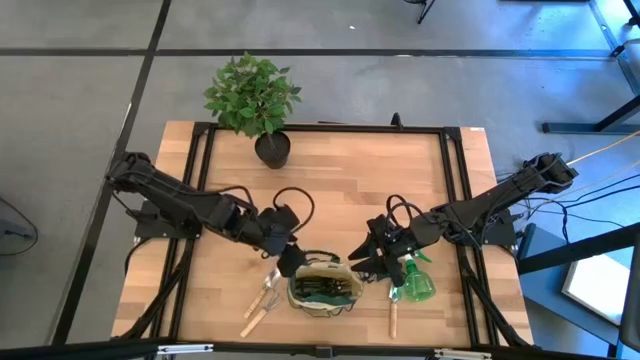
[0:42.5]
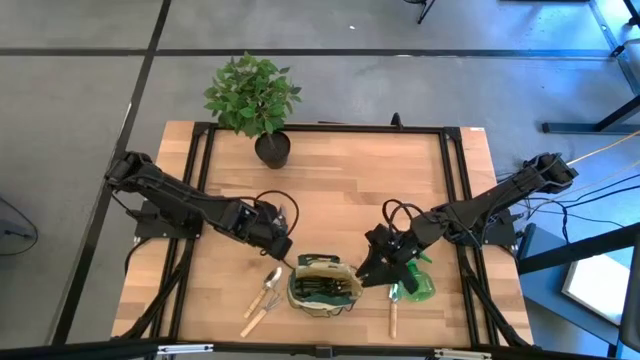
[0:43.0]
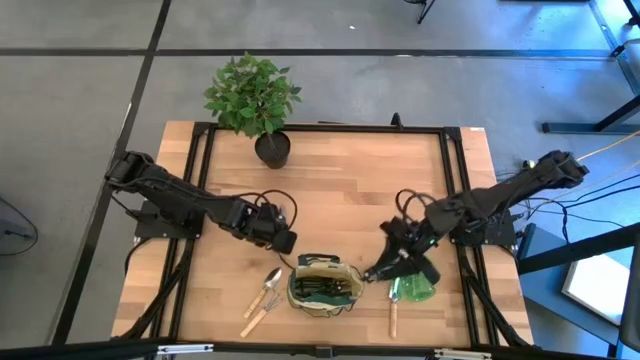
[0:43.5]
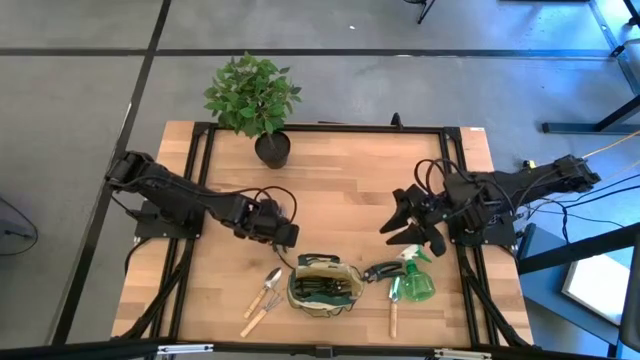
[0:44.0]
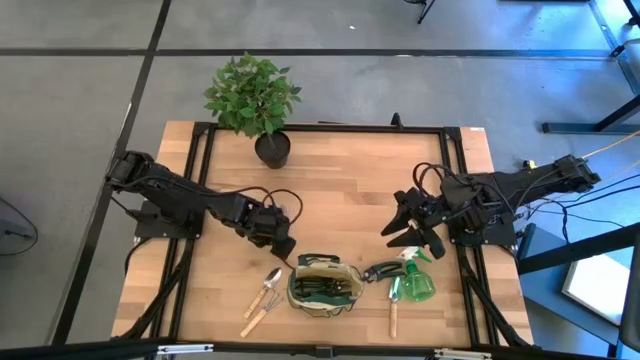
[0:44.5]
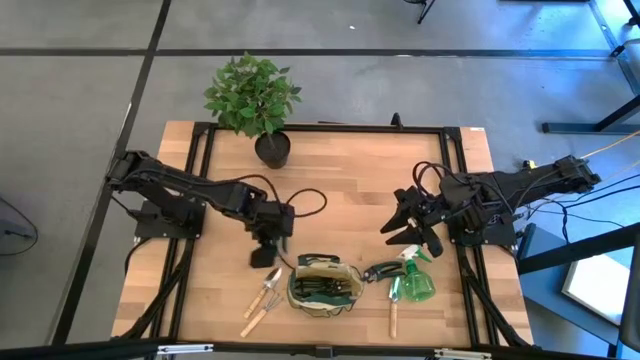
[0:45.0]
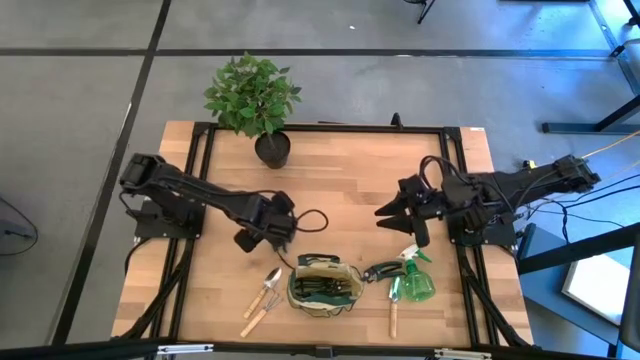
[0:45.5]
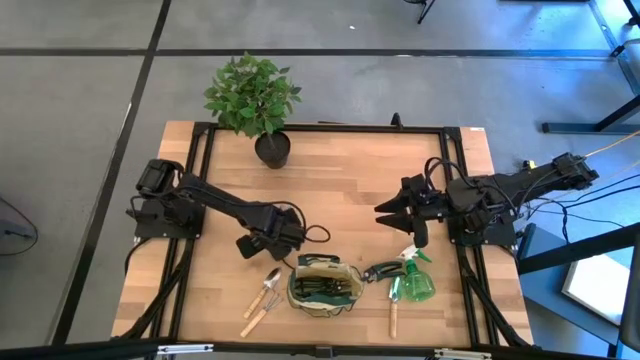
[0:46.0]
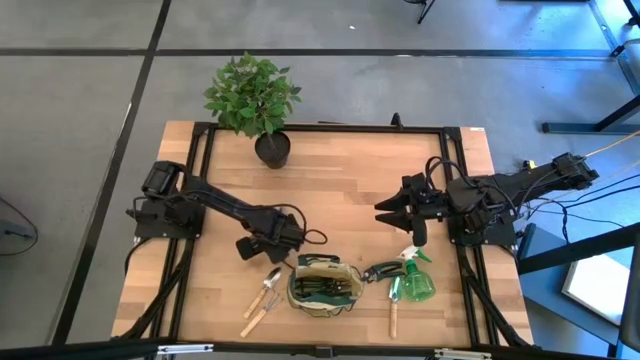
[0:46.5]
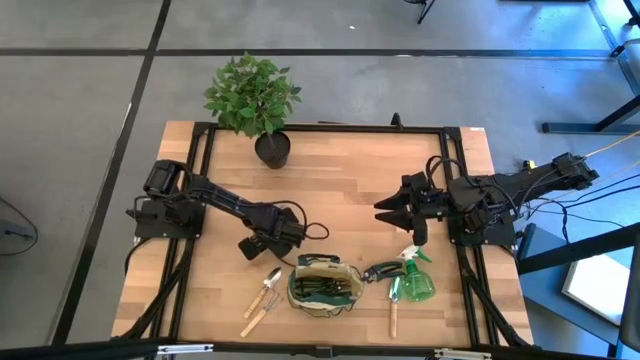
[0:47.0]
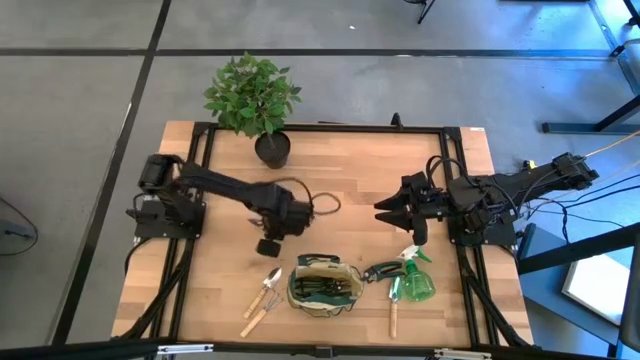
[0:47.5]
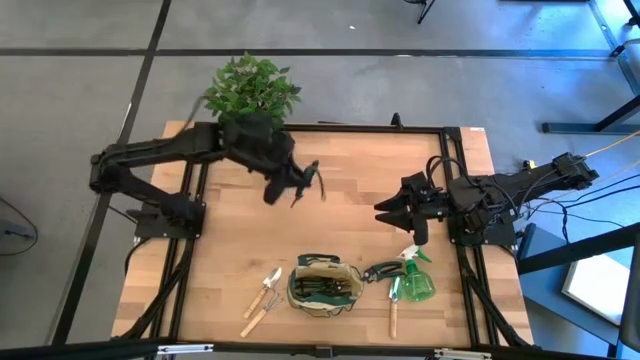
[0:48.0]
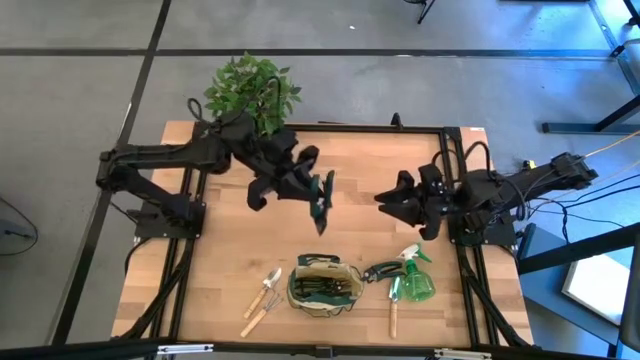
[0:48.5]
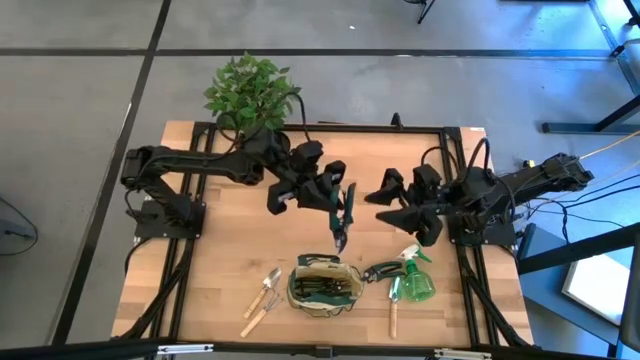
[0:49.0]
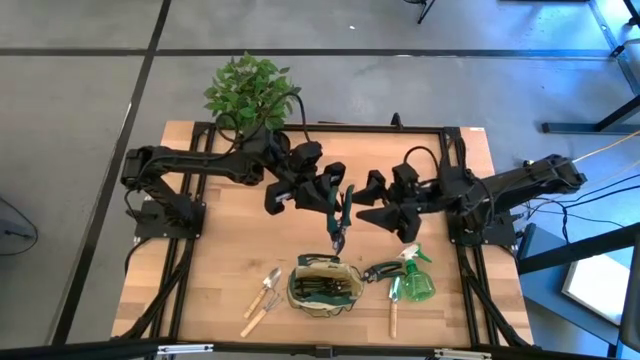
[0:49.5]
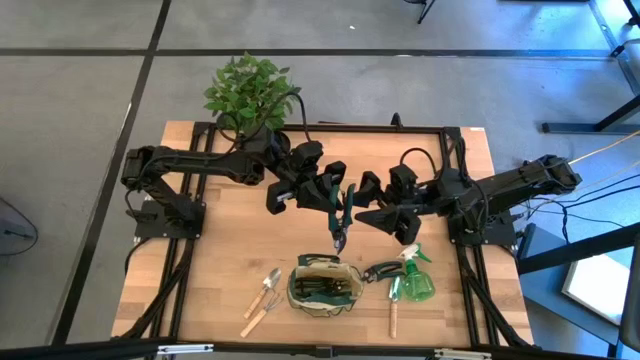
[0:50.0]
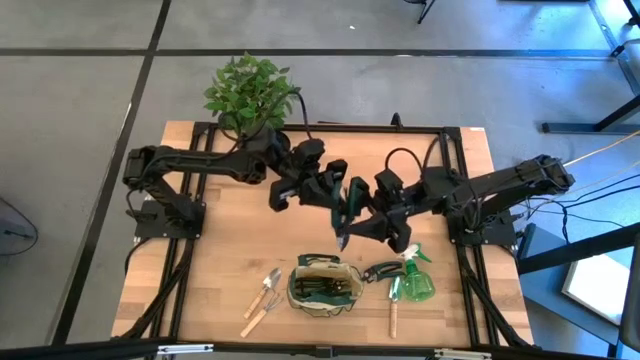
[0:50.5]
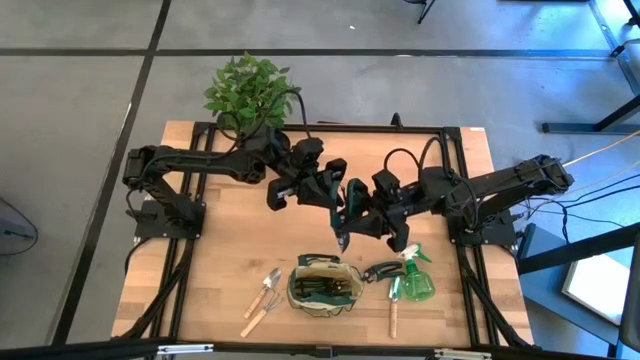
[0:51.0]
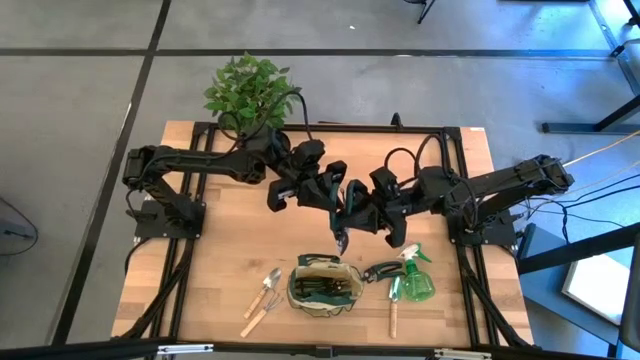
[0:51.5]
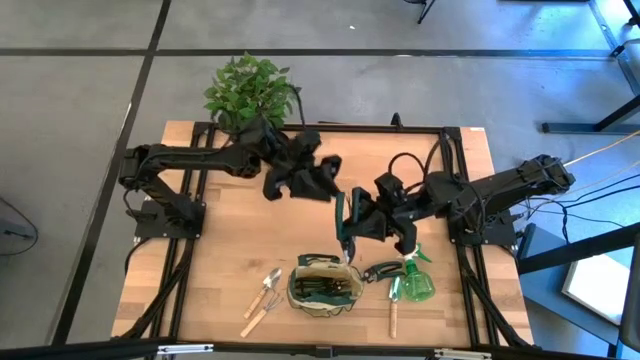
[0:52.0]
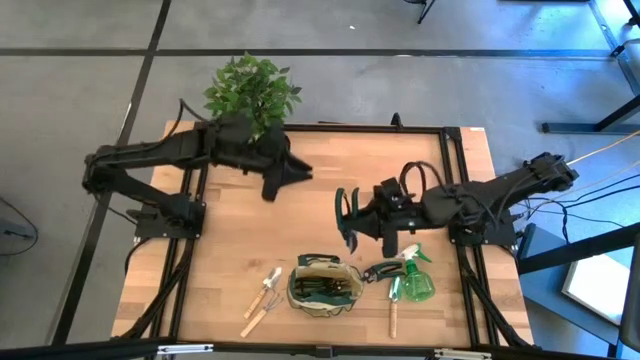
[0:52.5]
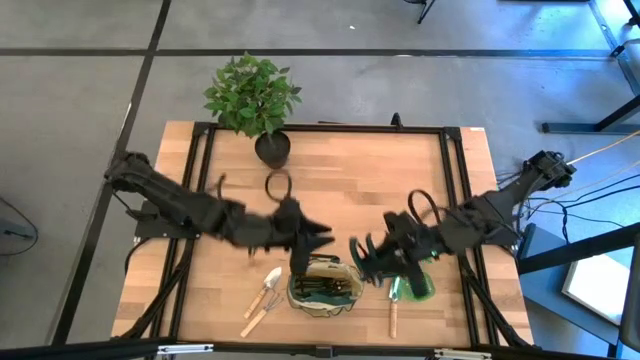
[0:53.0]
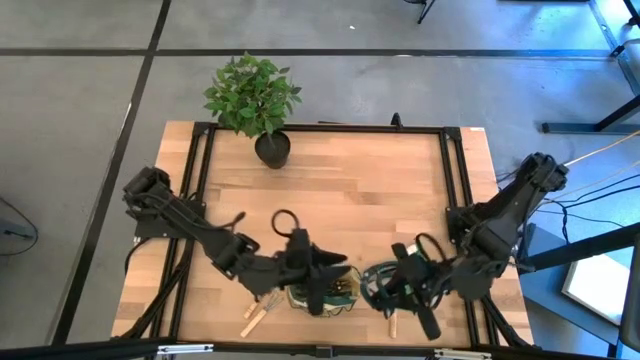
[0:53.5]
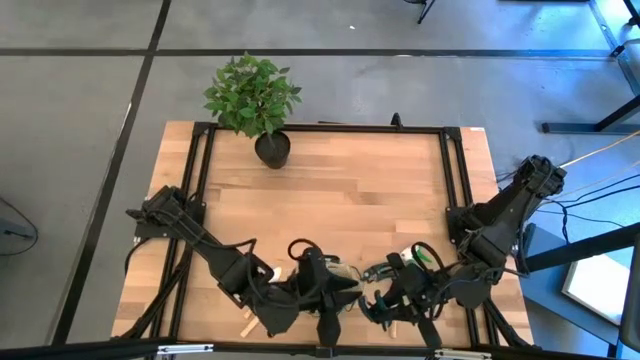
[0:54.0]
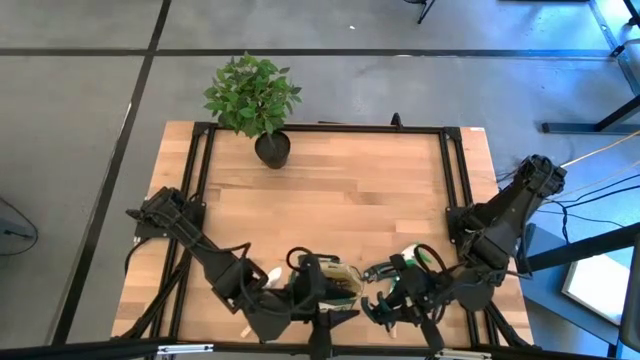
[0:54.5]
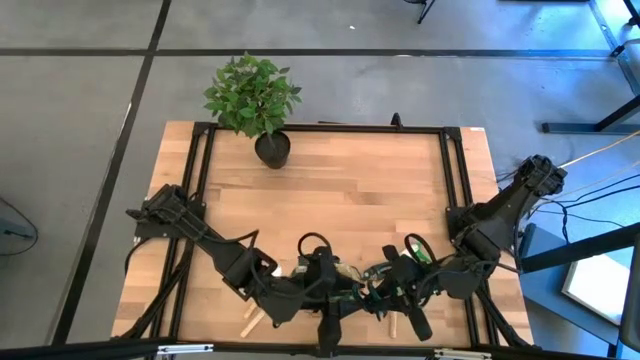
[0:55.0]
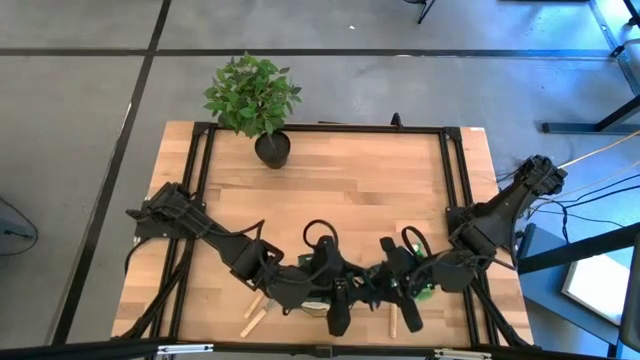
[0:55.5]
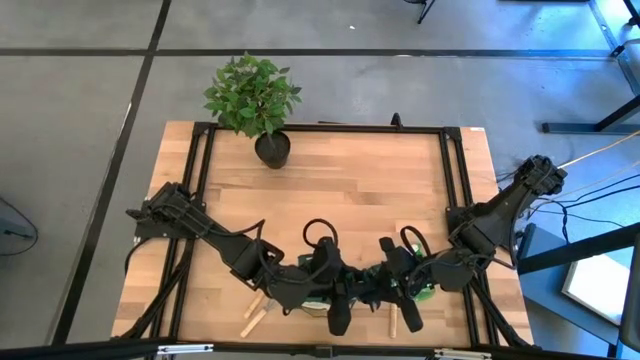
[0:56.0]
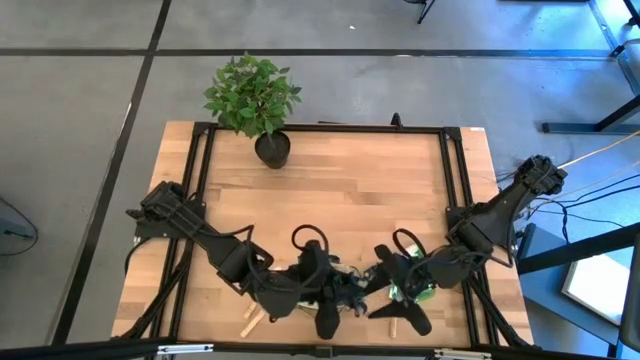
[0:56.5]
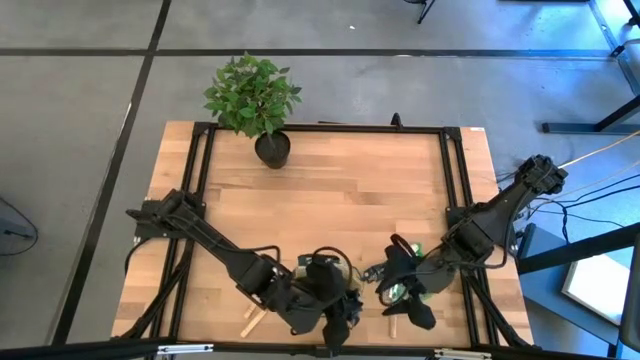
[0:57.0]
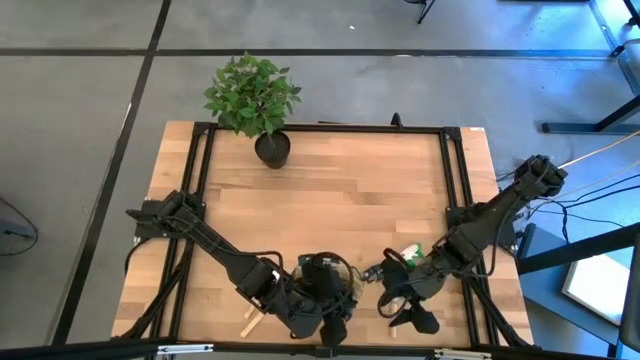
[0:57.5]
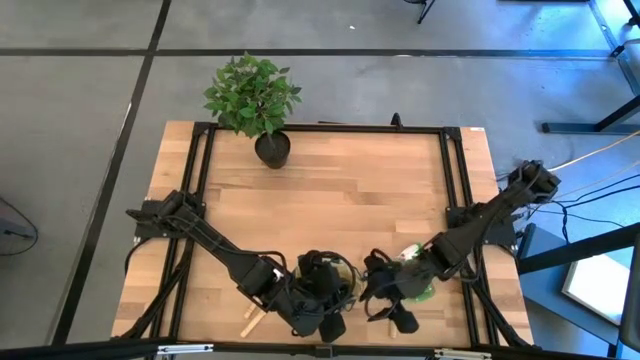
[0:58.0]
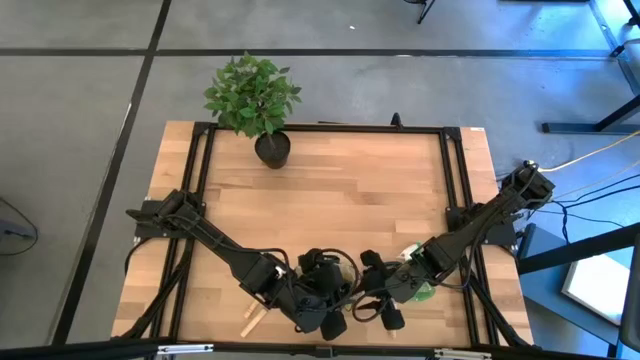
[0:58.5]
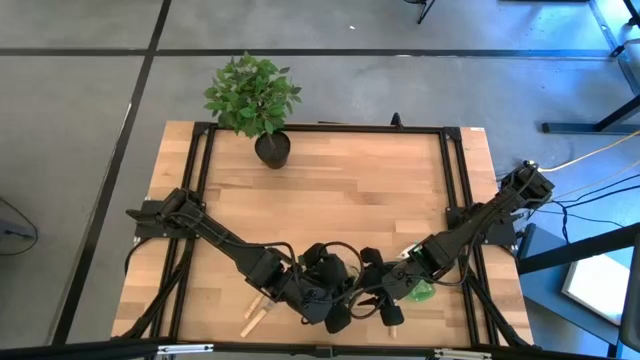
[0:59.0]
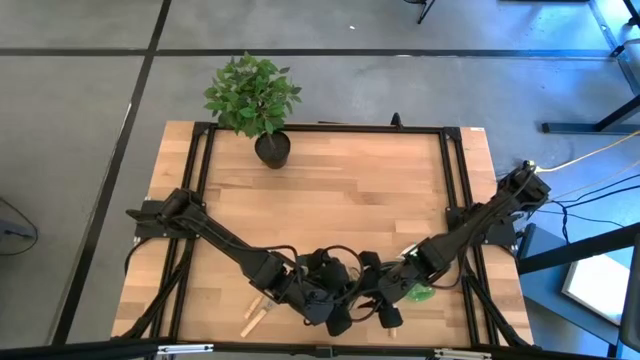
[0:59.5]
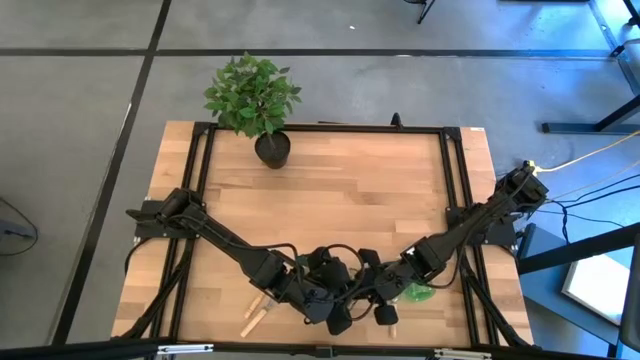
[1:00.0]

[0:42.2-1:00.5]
Task: Pick & Place Garden tools in Gardening bag
Put the top green shear scissors into the brown gardening bag
